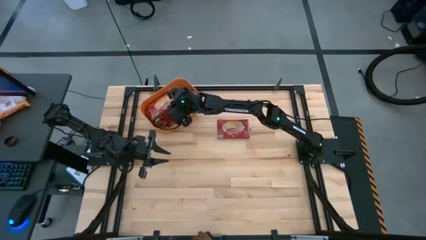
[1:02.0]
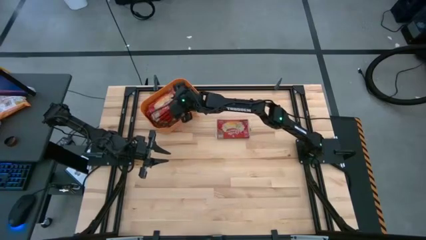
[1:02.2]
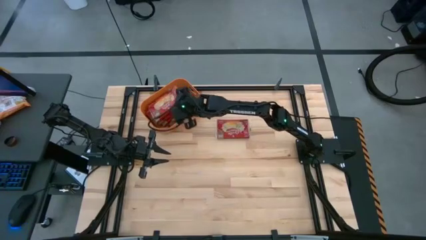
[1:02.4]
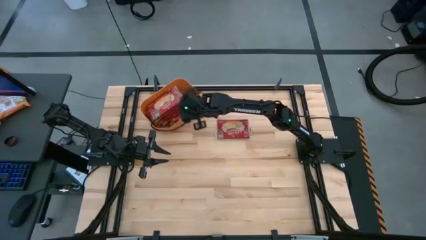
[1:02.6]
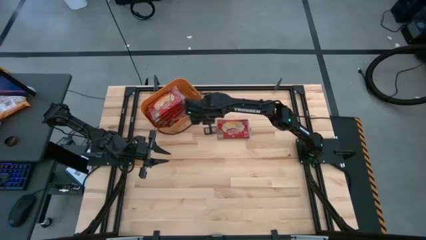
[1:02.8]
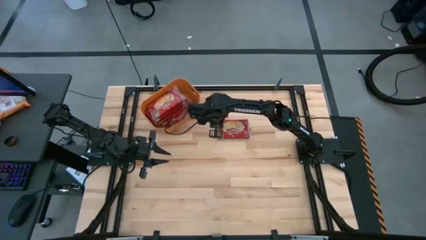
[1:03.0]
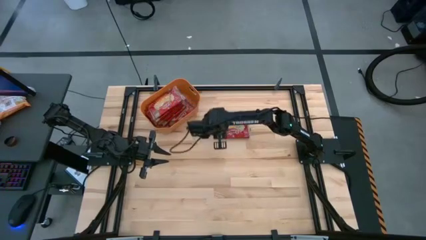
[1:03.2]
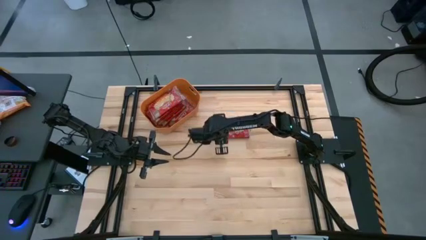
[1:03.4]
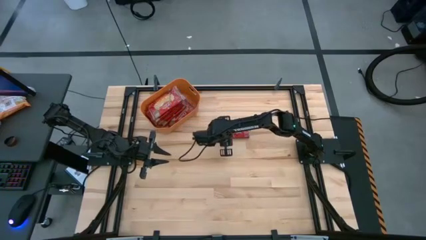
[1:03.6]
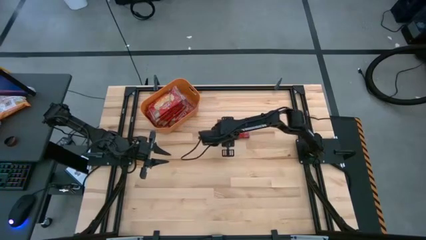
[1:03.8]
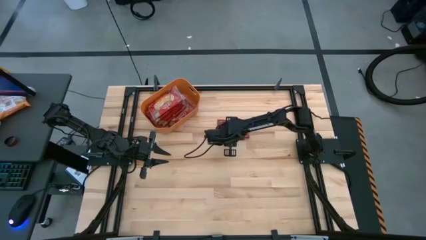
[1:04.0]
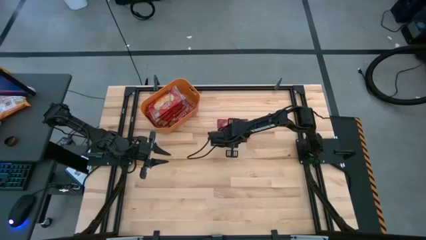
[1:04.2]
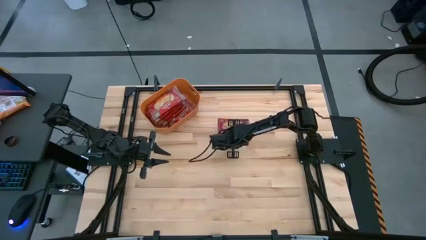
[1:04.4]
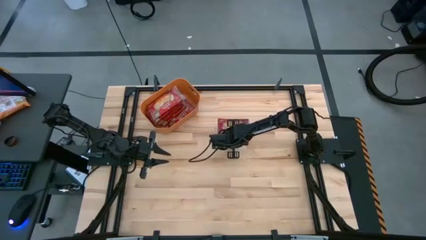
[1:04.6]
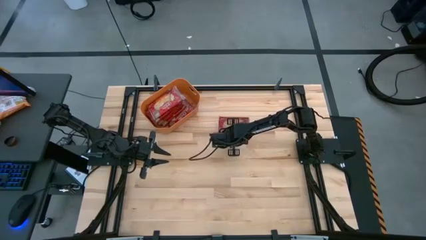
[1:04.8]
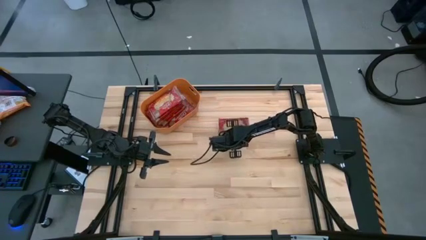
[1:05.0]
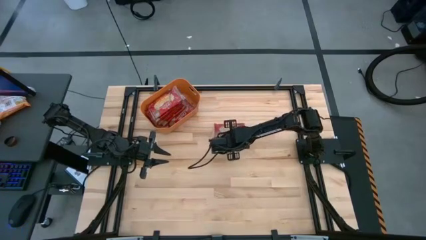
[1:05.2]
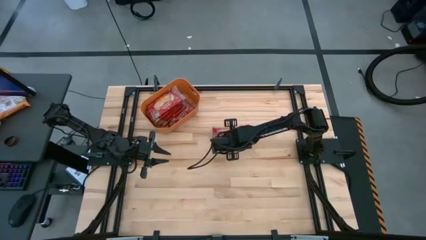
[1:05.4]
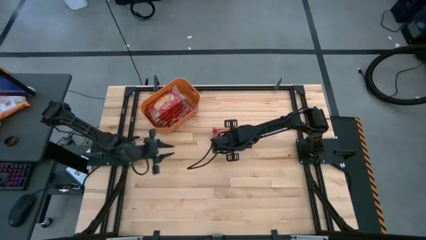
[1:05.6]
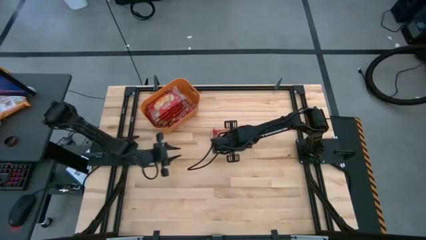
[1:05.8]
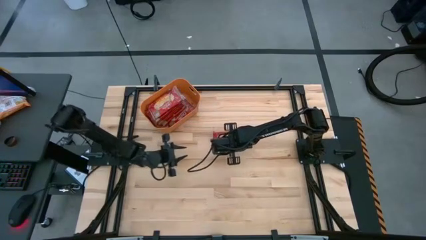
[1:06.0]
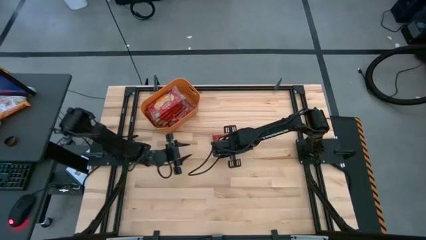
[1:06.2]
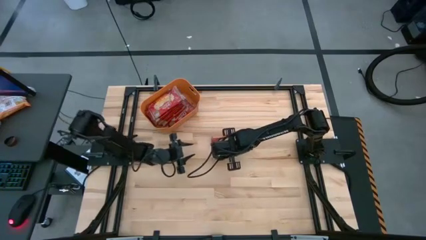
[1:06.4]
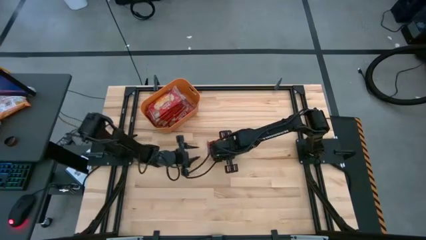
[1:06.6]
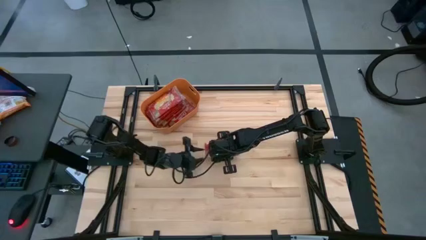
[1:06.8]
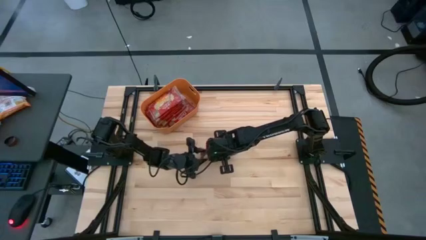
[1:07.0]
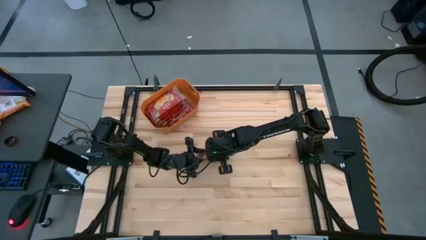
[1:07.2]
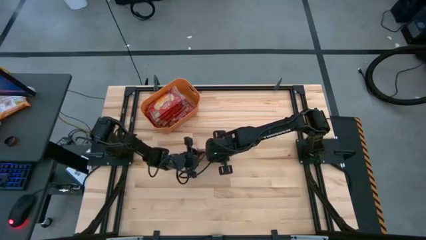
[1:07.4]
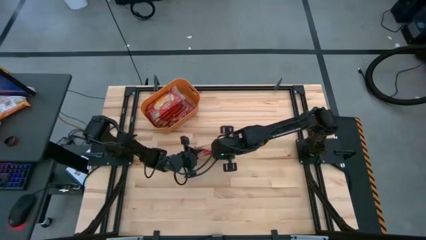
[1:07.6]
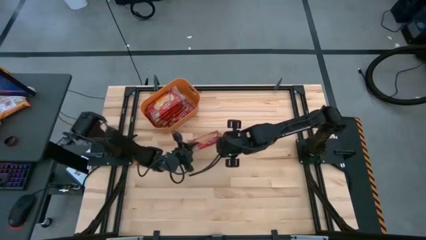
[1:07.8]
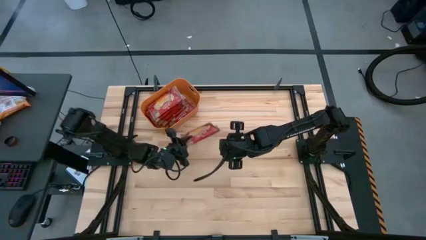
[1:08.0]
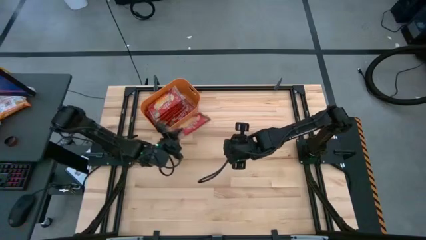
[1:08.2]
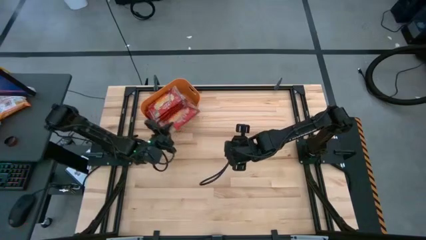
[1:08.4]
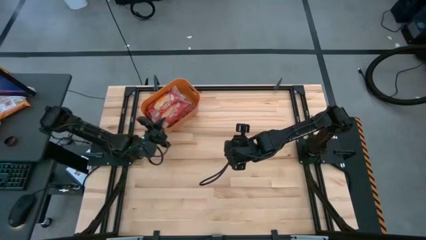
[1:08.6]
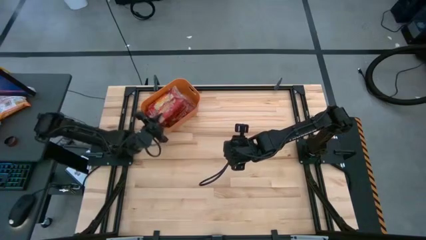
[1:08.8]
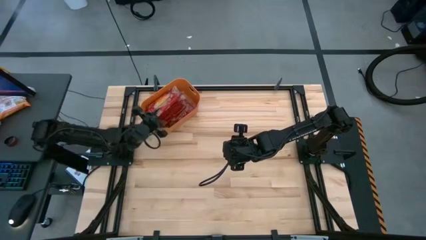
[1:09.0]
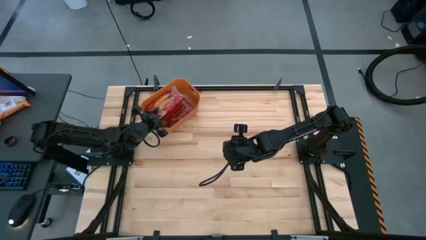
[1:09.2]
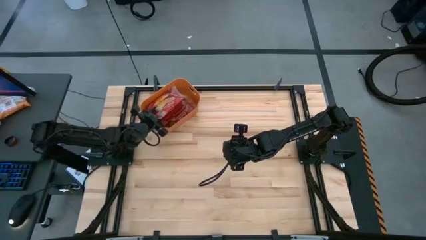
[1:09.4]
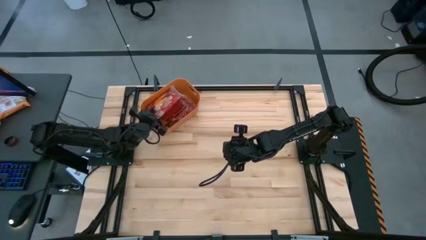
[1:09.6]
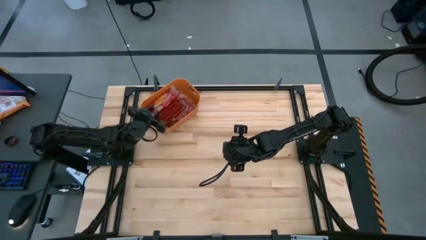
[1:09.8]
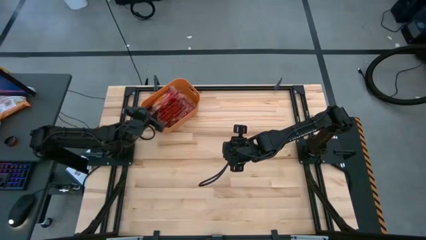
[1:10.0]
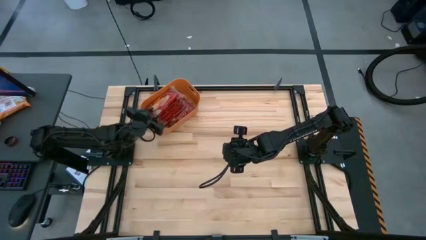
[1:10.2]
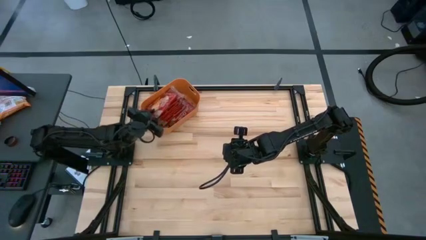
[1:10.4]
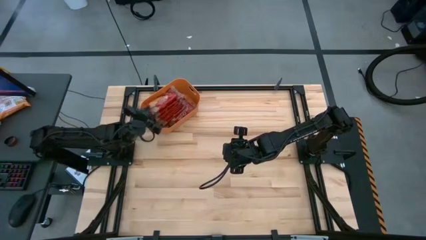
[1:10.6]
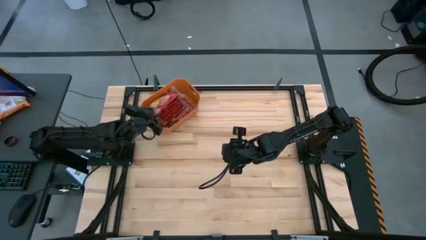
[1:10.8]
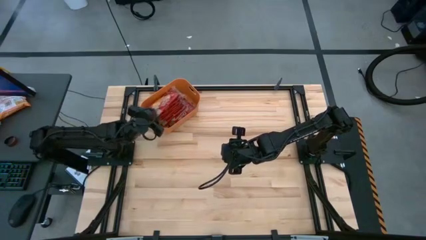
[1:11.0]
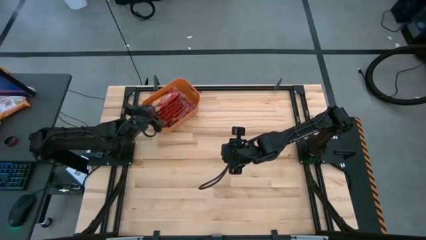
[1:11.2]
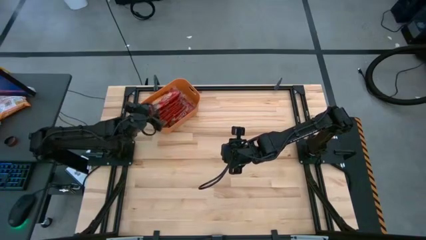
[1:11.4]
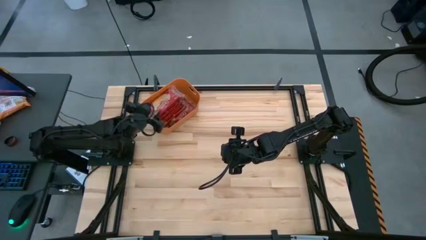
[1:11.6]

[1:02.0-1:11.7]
Task: Sort popcorn bags into baskets
Put the red popcorn pack into the orange bin

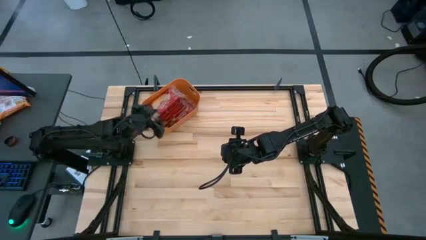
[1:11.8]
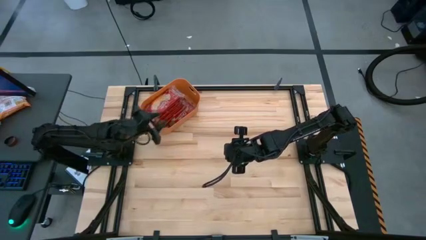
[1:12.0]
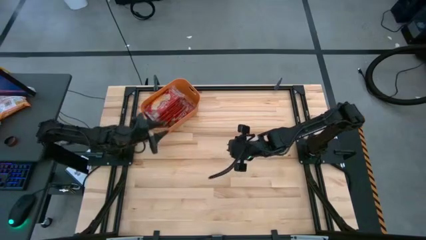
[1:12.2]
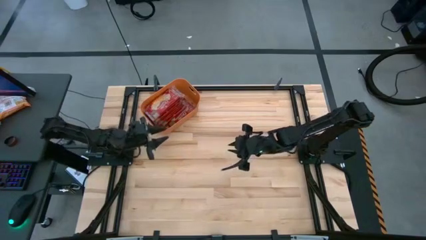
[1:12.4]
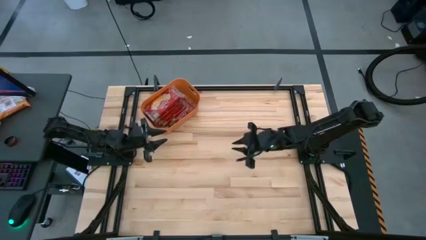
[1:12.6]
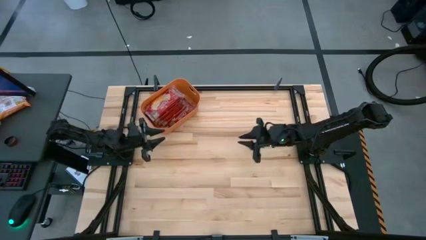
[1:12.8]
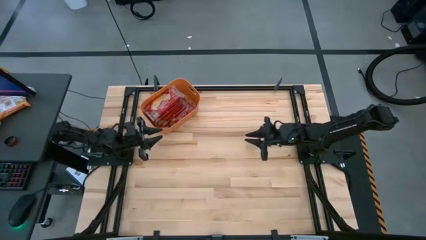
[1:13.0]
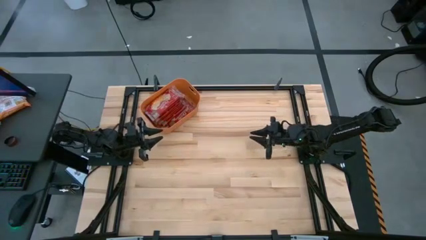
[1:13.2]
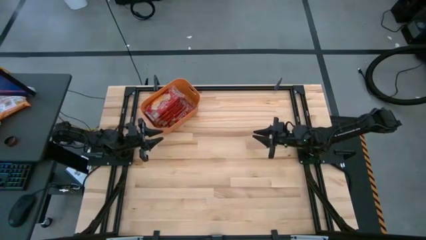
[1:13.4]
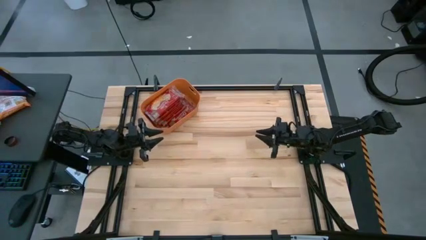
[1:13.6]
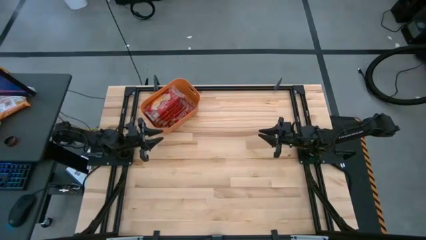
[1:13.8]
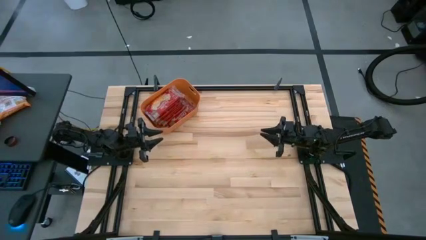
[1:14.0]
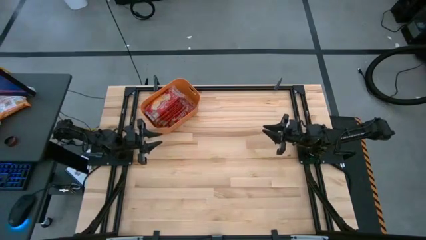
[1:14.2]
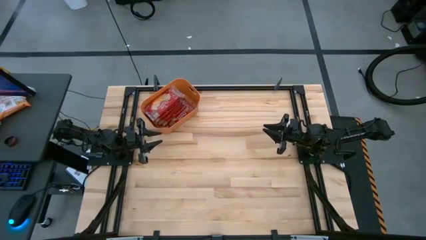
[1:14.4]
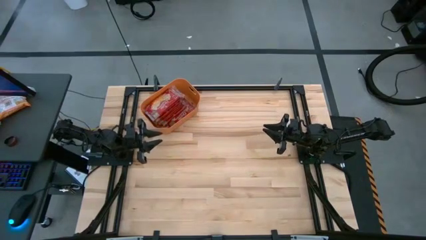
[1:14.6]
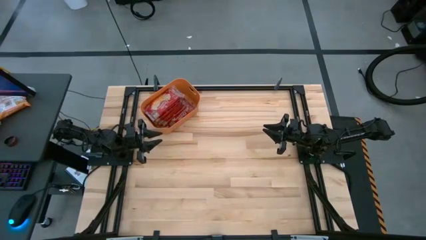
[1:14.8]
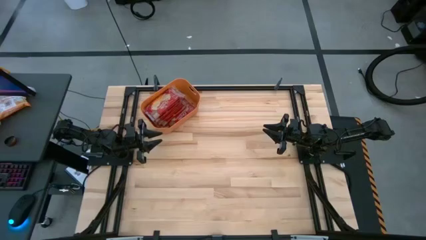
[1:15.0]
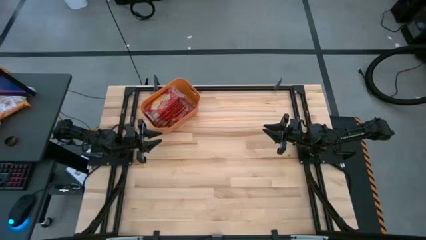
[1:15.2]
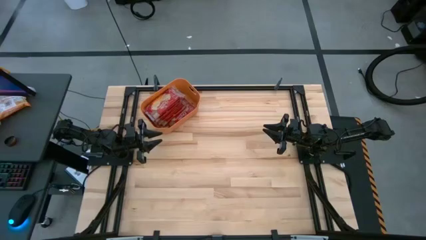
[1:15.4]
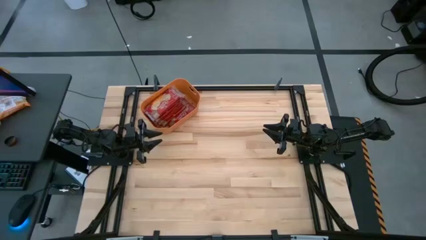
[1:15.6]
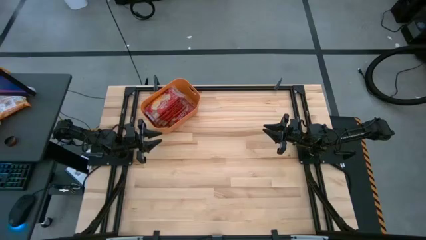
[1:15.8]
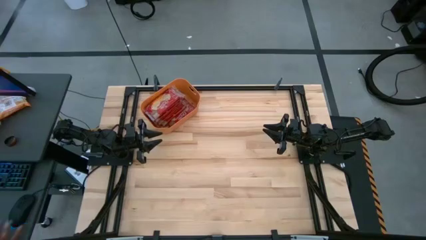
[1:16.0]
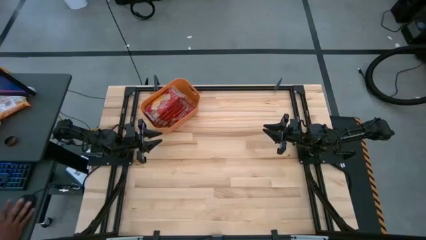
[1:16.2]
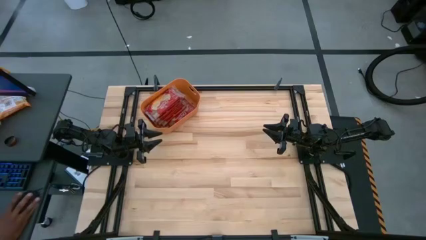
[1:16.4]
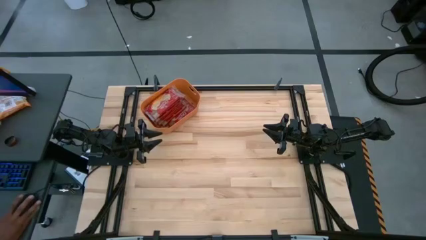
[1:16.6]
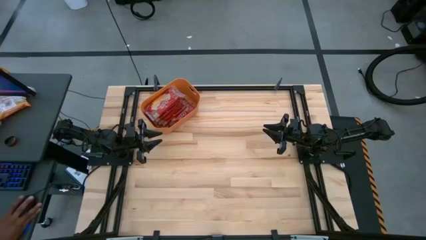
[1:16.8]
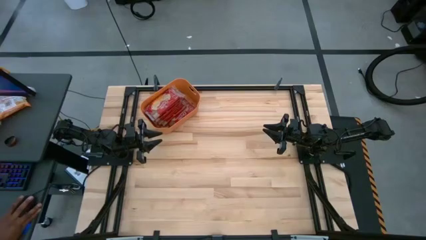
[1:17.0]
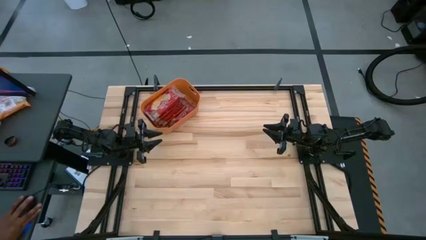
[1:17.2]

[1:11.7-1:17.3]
Return to Home Position

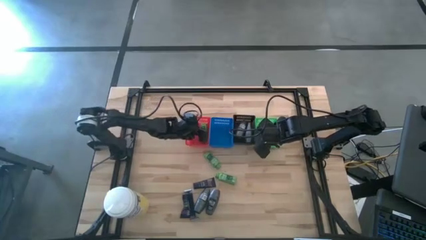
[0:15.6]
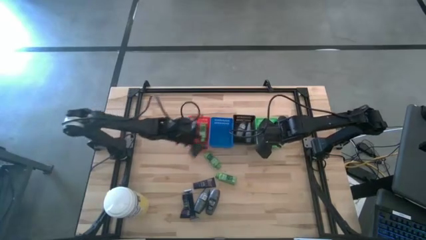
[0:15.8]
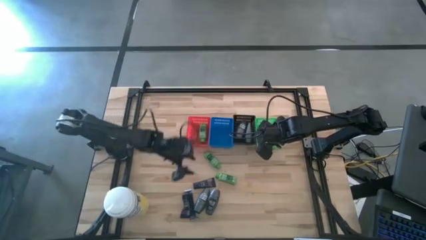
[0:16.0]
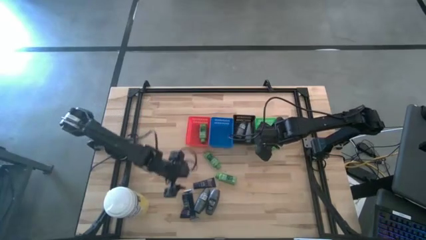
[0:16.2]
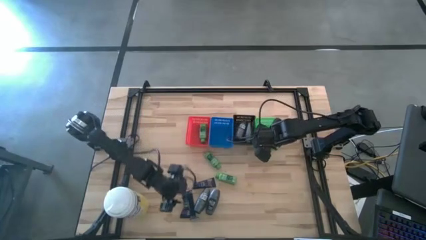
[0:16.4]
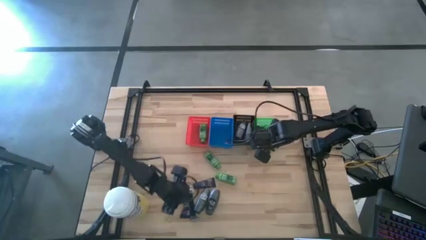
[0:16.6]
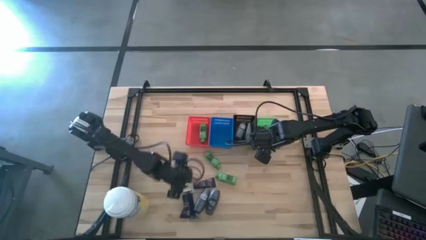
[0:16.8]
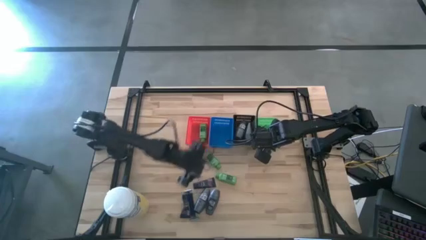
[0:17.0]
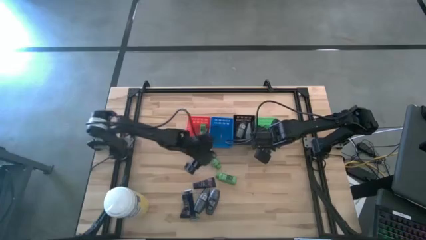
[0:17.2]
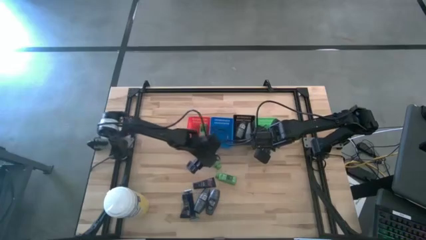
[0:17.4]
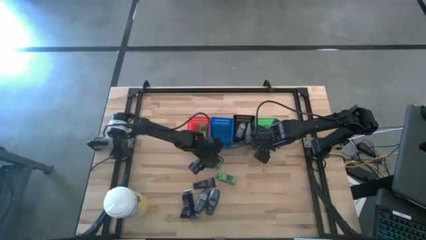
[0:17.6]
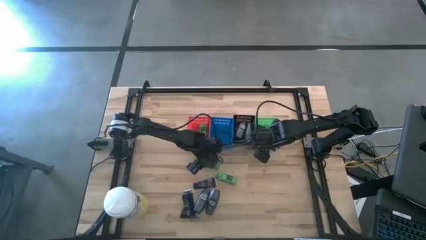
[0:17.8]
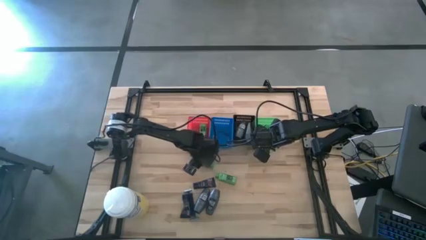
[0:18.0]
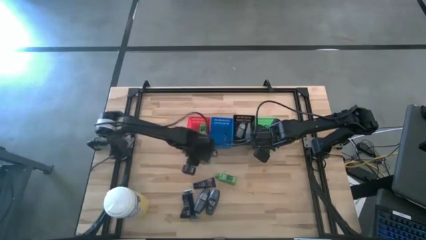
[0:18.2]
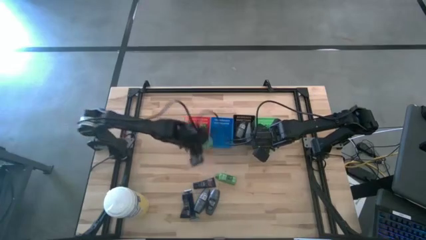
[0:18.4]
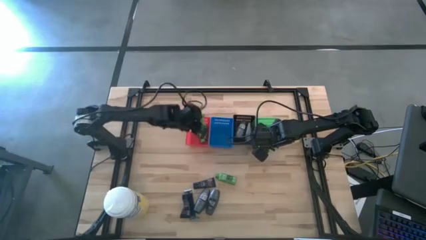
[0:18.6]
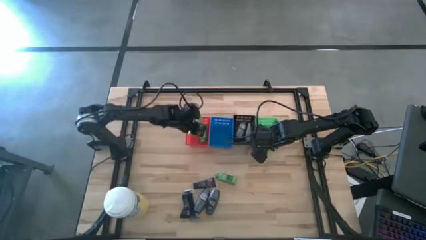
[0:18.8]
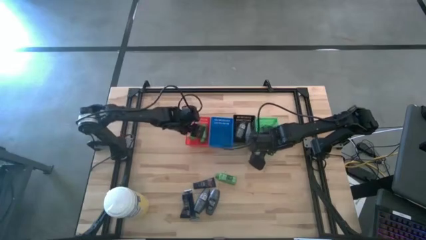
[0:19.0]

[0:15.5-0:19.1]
Task: Pick & Place Travel size toiletries
Put the green shampoo into the red bin
